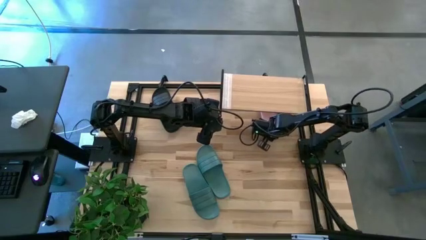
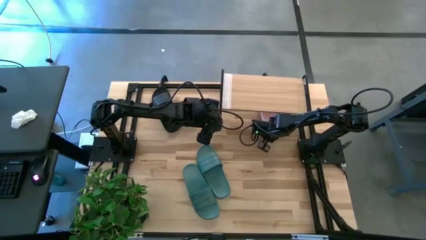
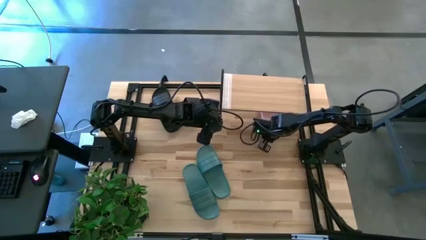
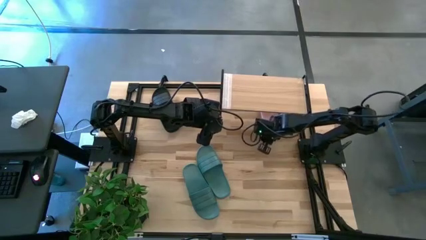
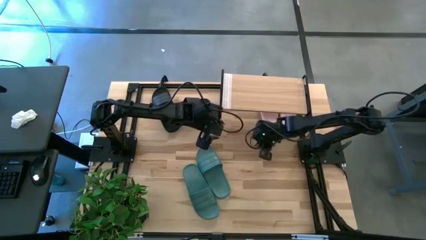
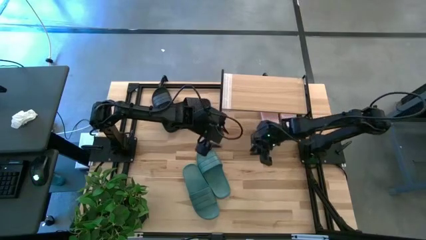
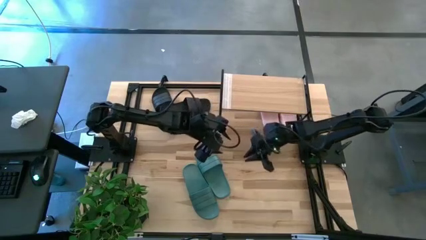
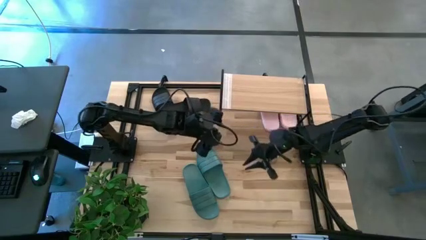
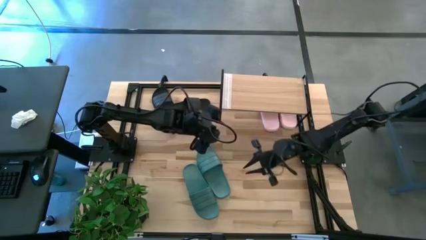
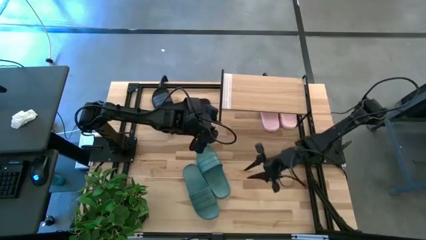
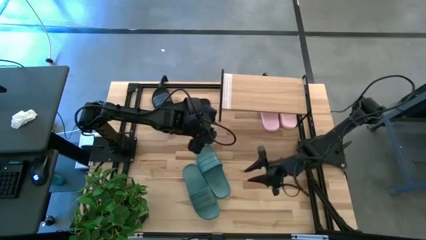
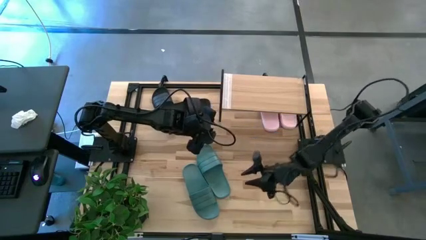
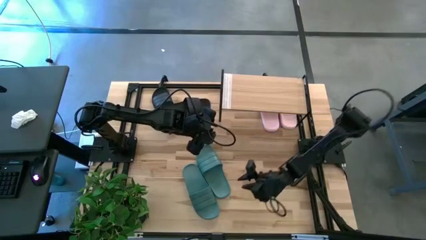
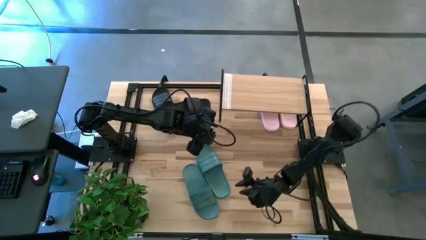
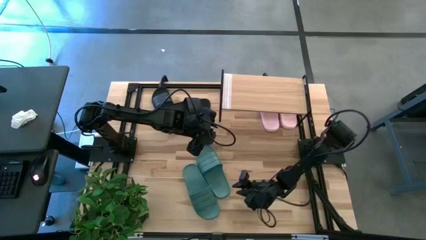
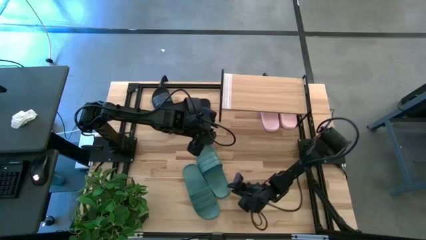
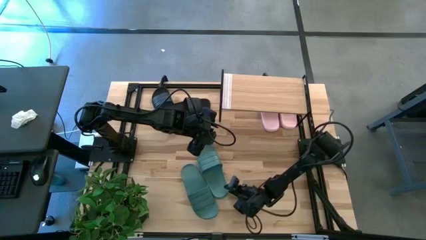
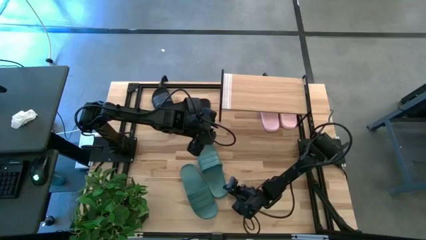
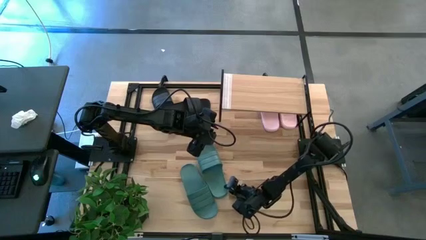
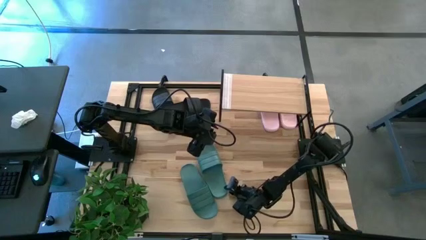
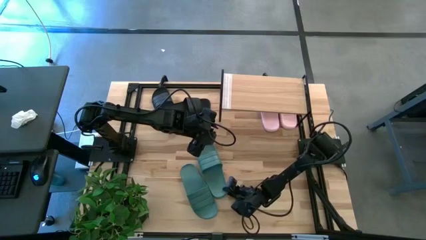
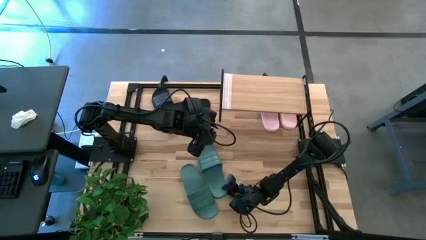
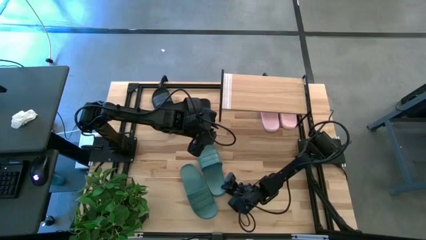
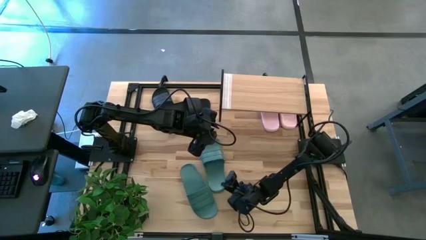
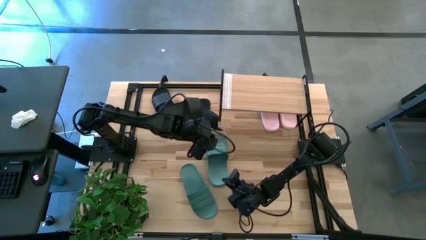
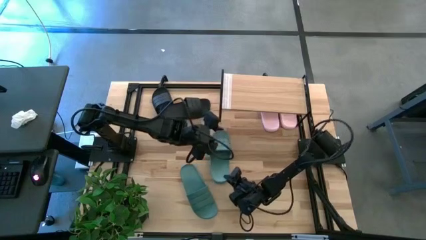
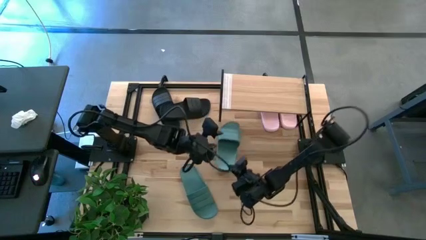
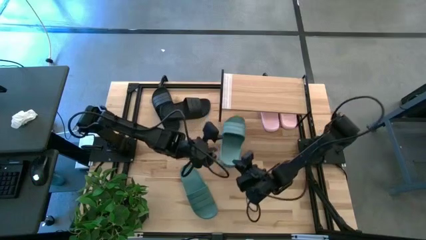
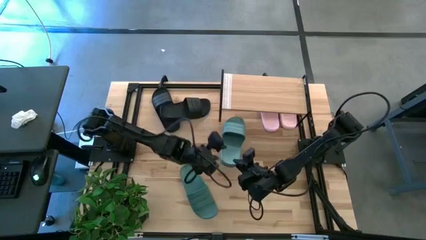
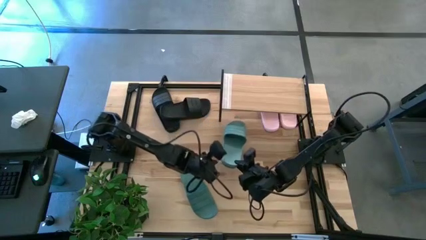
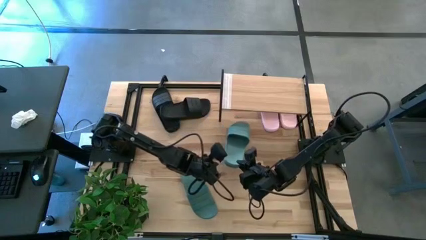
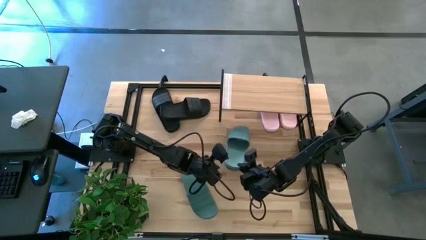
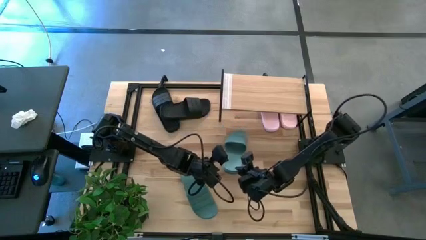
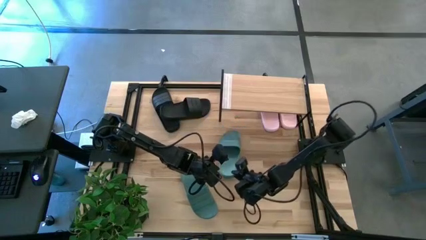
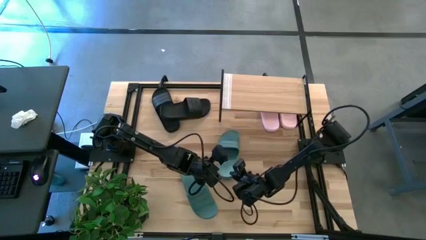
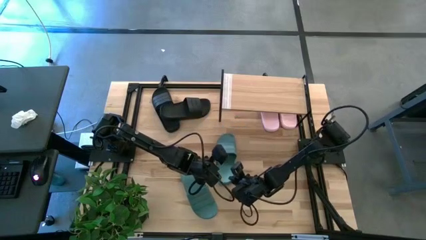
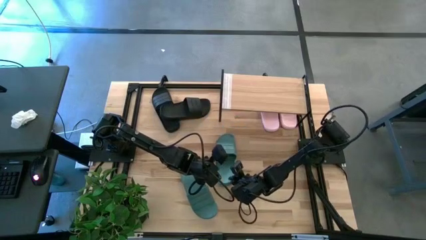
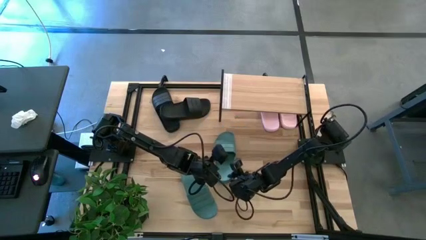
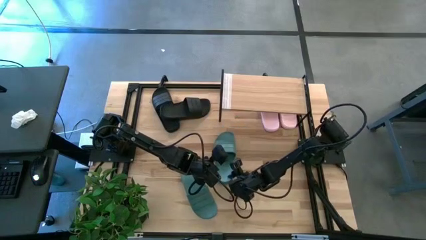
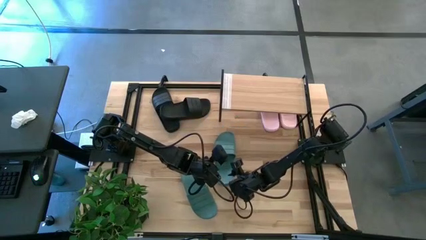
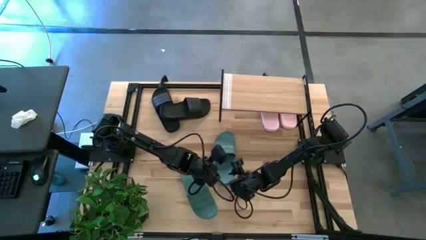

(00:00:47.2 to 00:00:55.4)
Task: Pick and place slides into the shelf
Put the right green slides under the shelf
